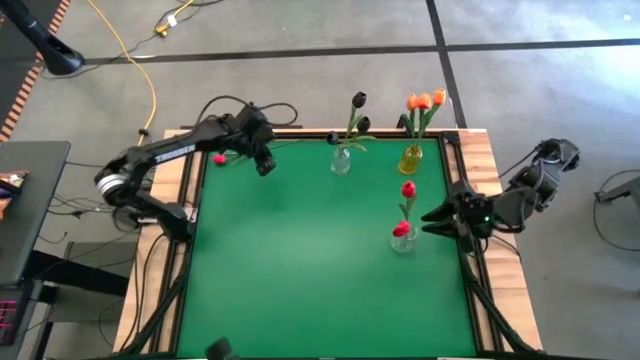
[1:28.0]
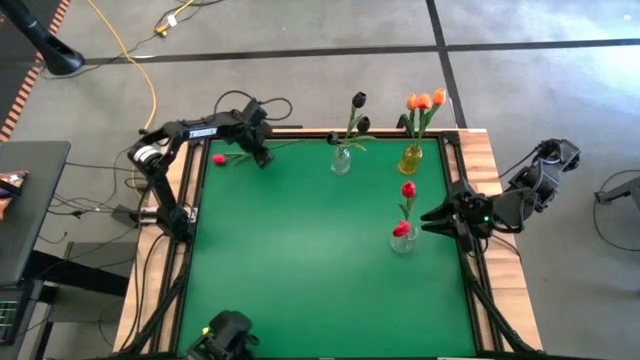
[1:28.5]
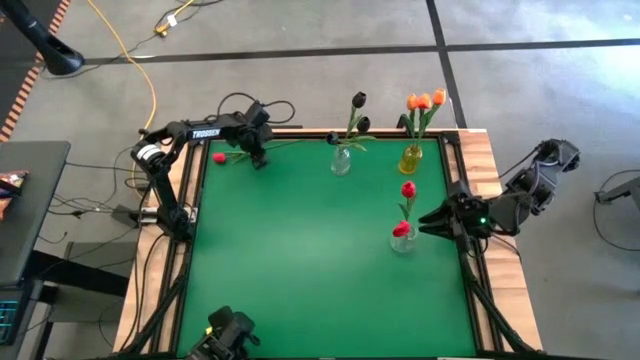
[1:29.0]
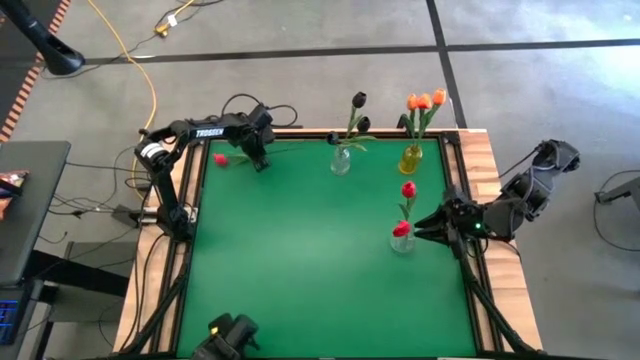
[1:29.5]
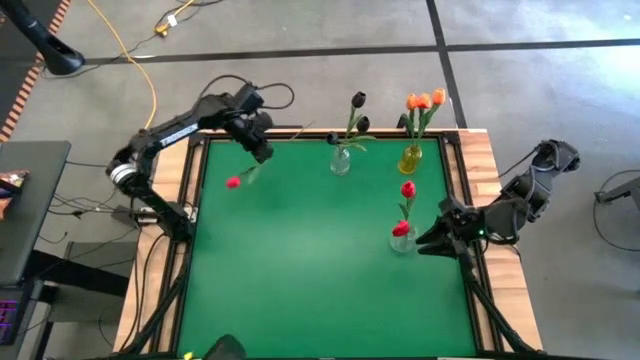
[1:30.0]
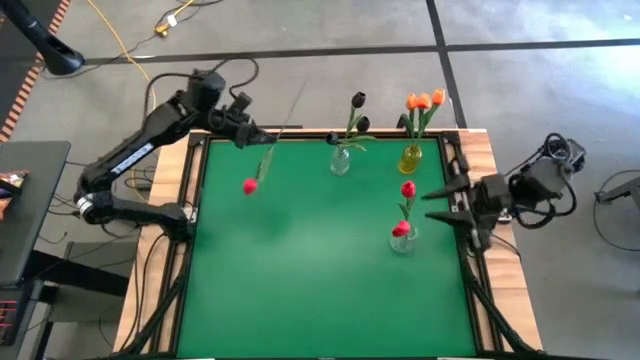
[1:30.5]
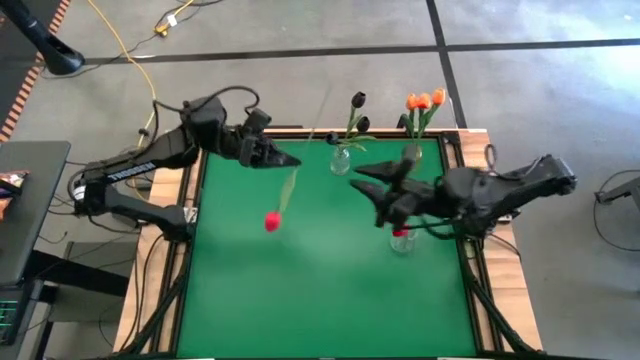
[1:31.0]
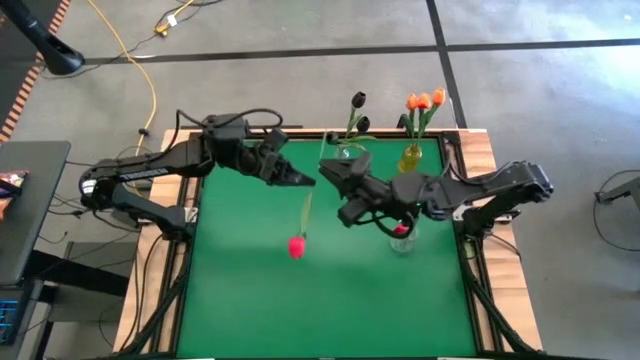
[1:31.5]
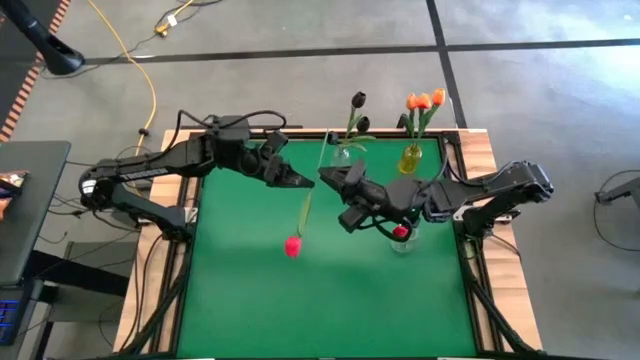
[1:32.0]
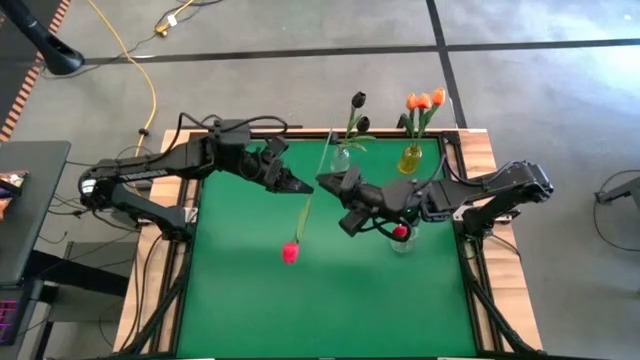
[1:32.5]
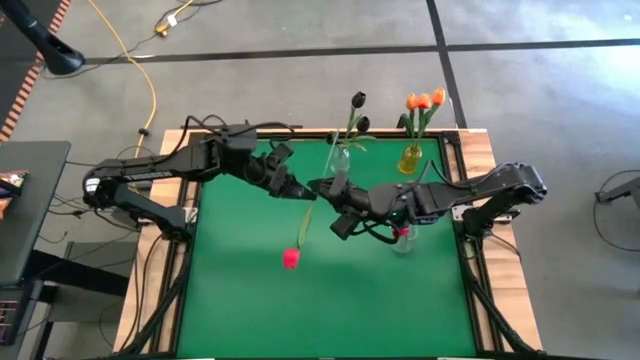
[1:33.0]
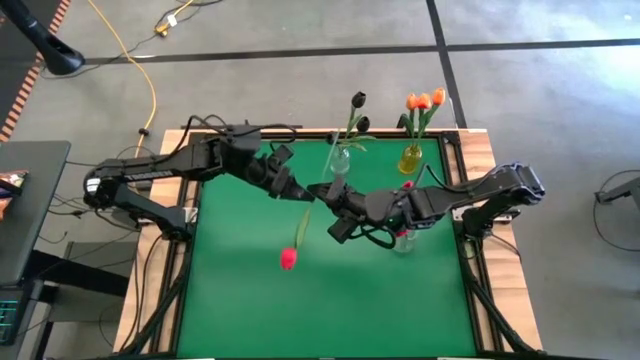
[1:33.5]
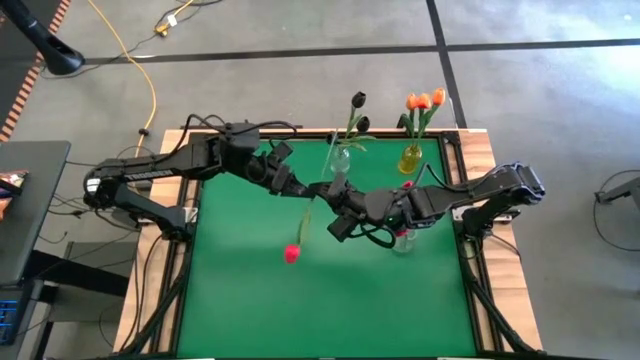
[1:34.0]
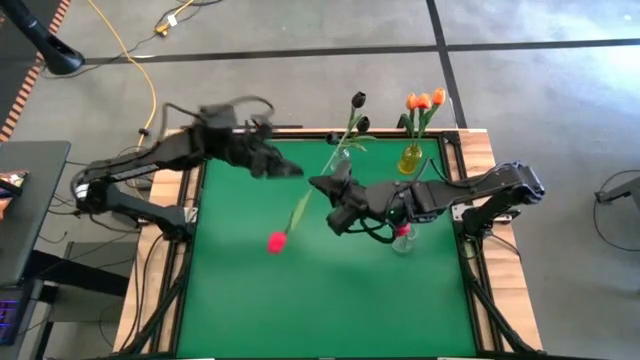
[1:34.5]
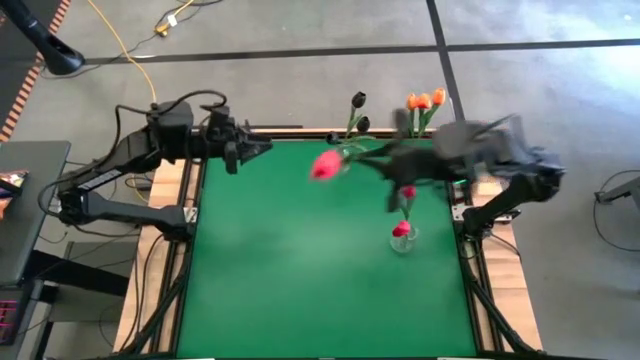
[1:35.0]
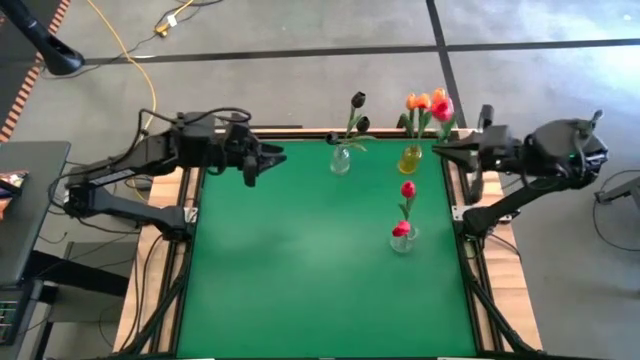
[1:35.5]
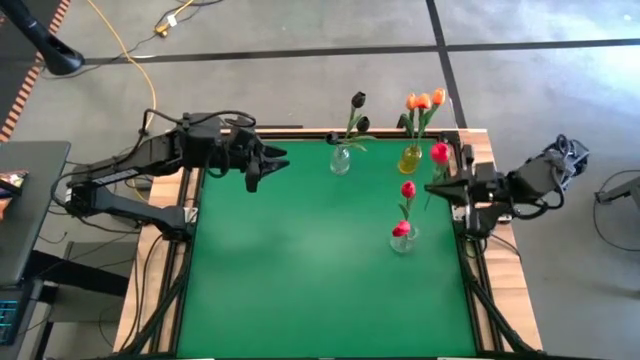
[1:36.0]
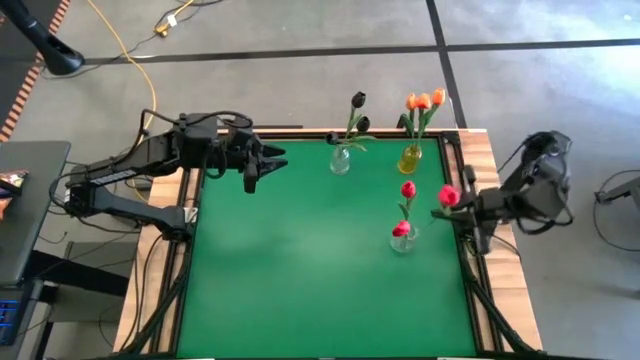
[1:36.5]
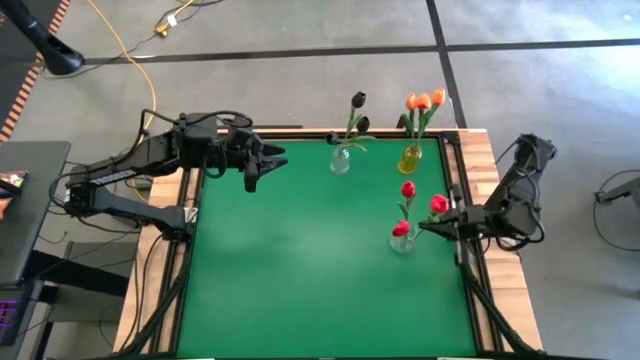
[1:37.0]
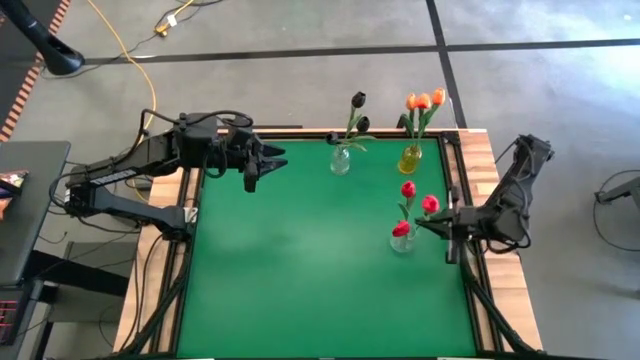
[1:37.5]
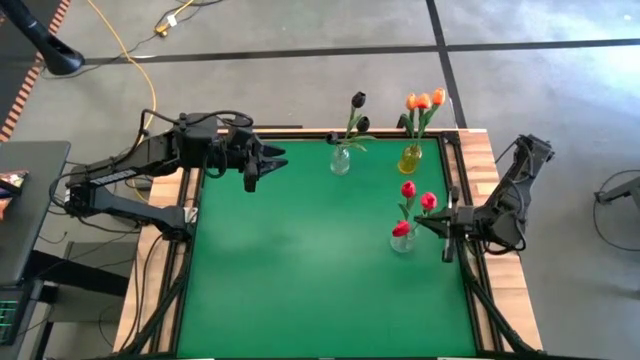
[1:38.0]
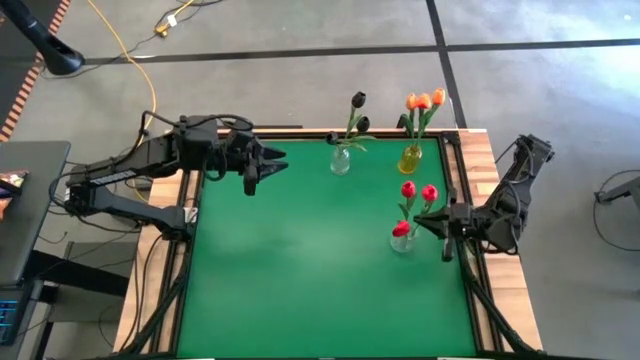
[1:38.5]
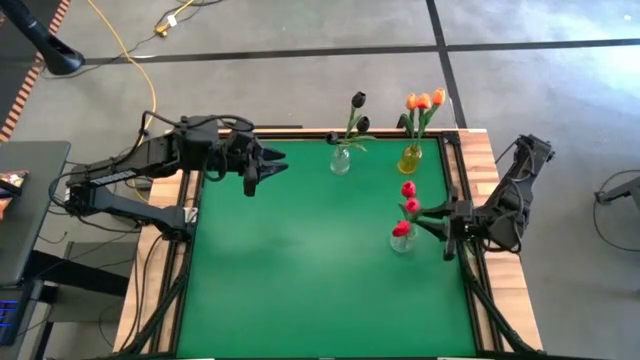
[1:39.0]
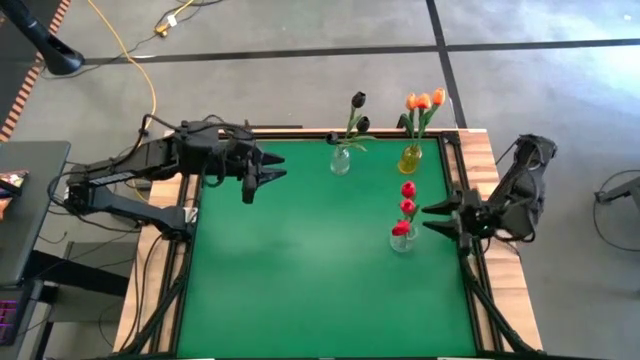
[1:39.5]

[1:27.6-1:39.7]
Task: Sort flowers into vase by color
Put the red flower into the right transparent vase

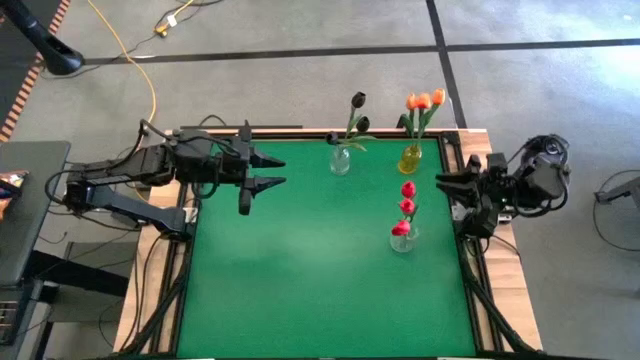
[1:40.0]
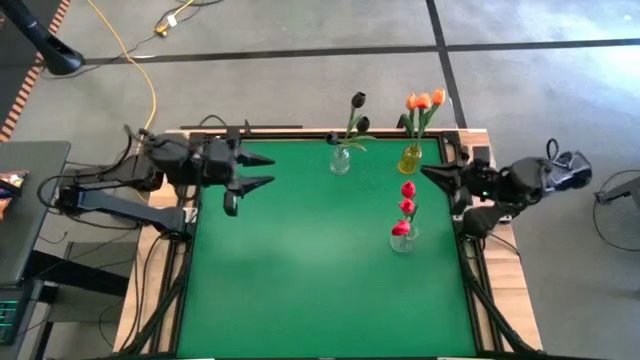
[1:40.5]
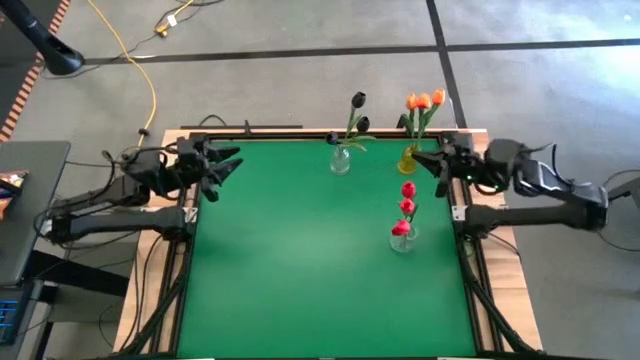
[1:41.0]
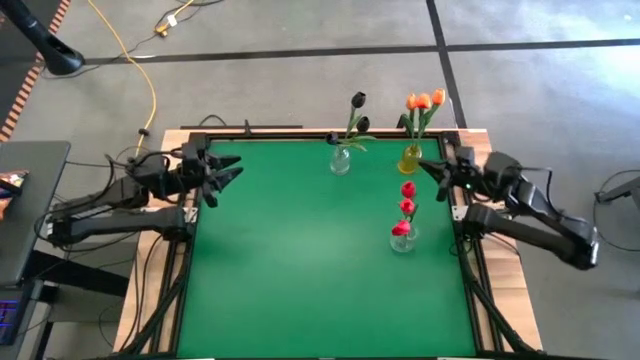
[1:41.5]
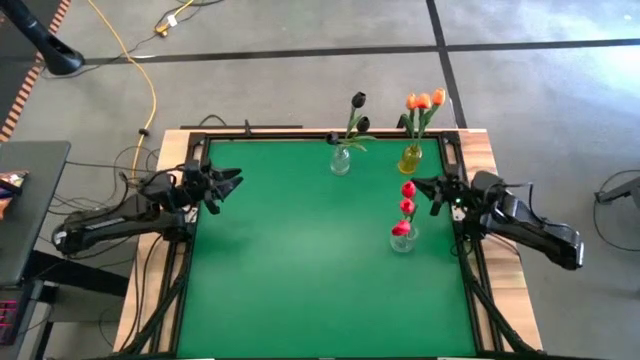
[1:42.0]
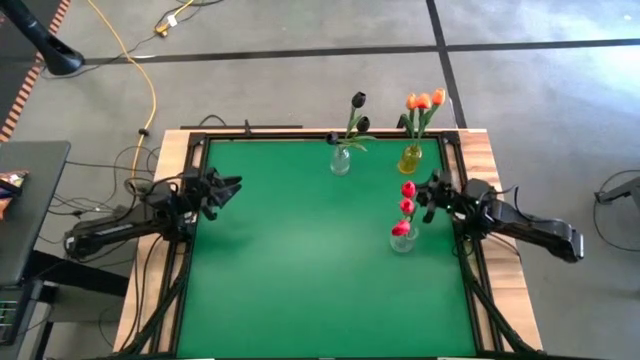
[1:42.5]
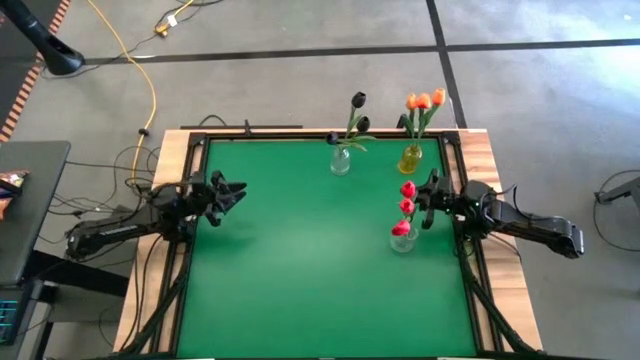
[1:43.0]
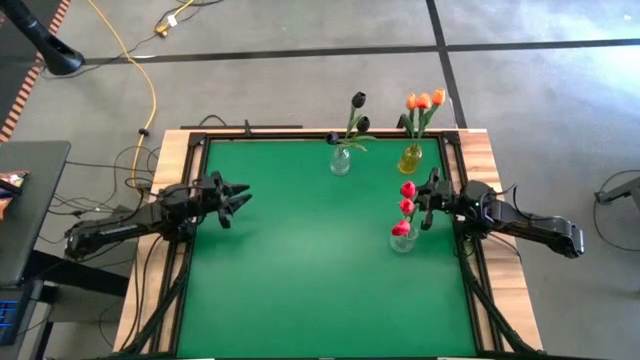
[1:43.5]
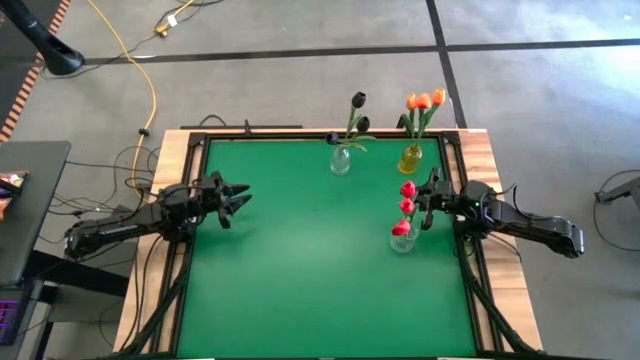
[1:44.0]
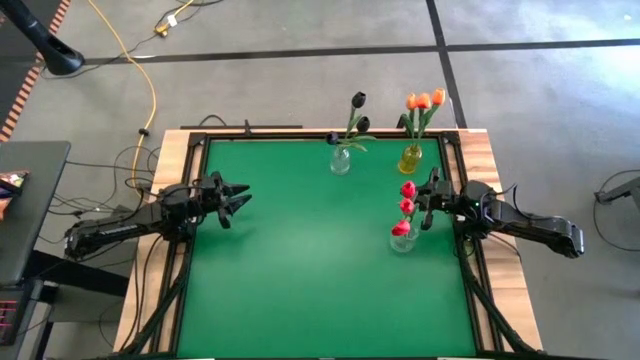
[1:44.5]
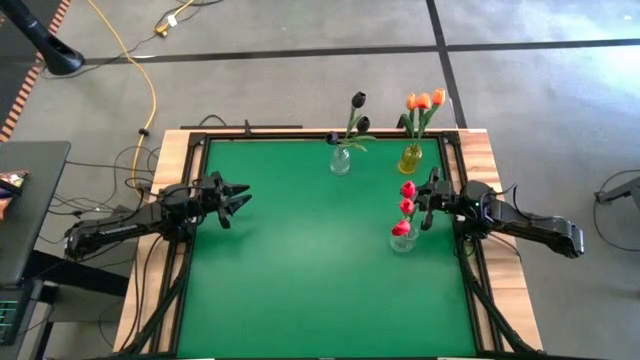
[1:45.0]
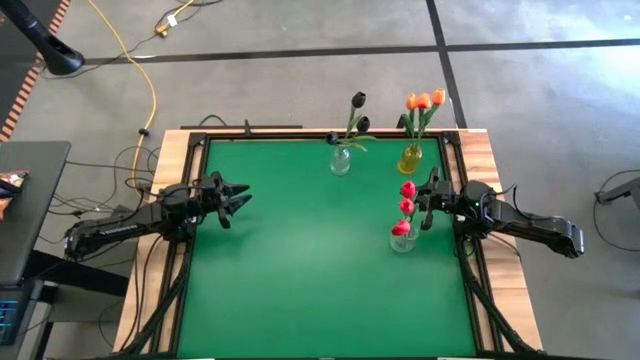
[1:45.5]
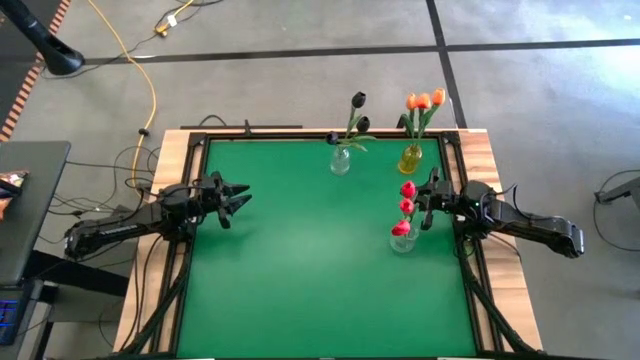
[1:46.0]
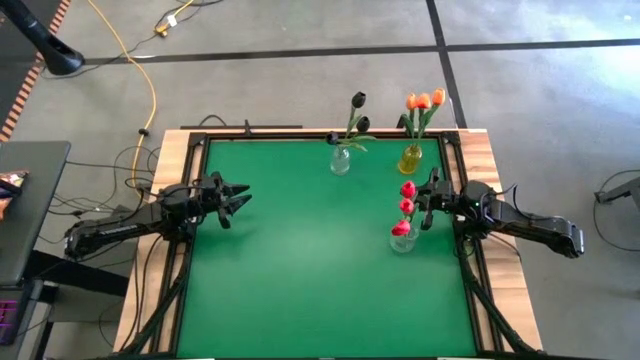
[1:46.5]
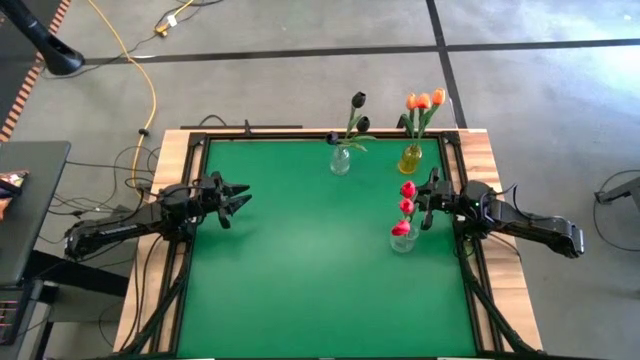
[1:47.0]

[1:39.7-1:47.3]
Return to Home position

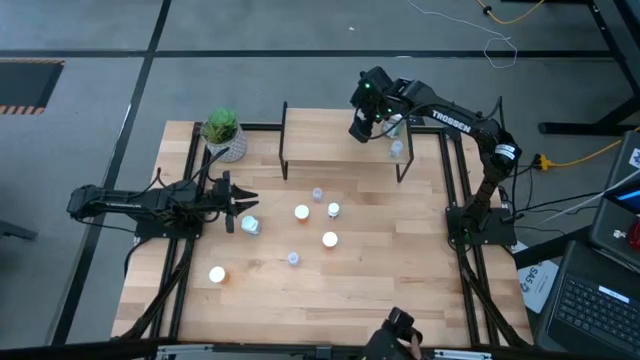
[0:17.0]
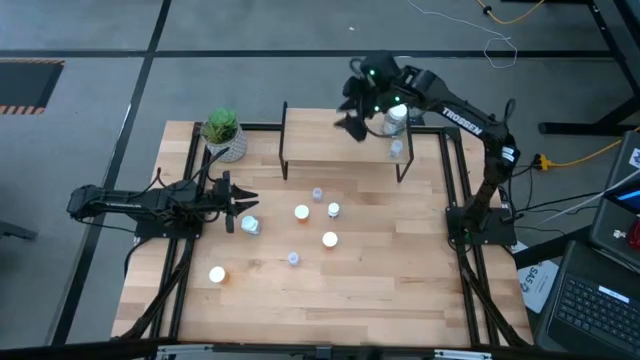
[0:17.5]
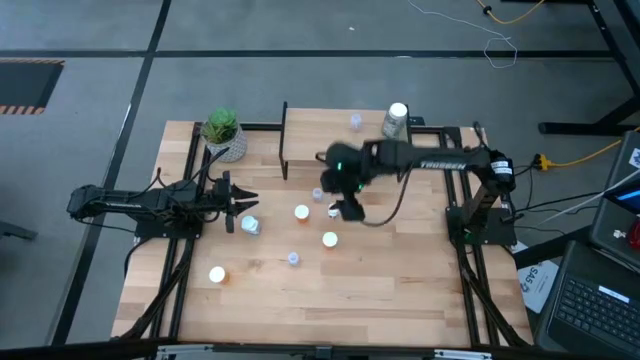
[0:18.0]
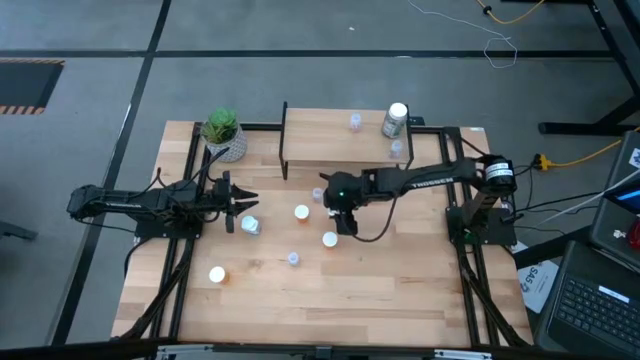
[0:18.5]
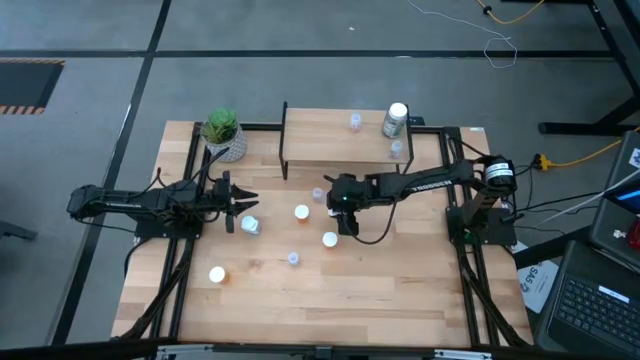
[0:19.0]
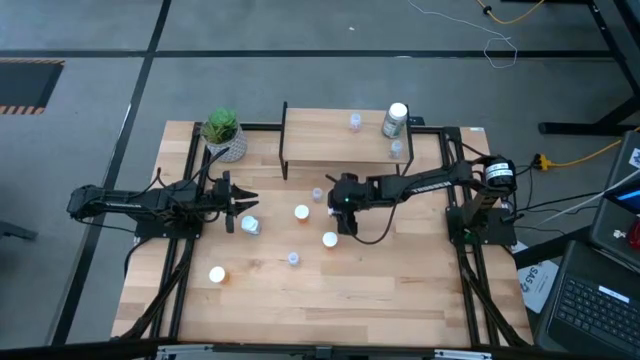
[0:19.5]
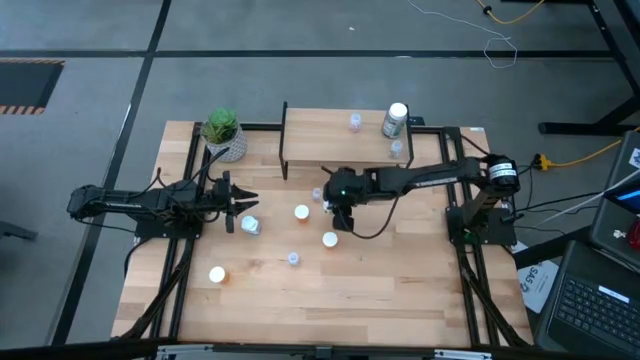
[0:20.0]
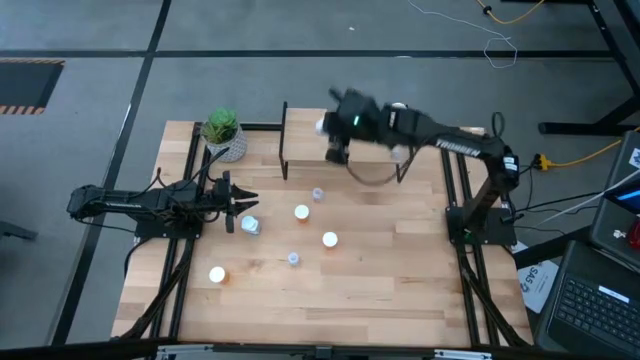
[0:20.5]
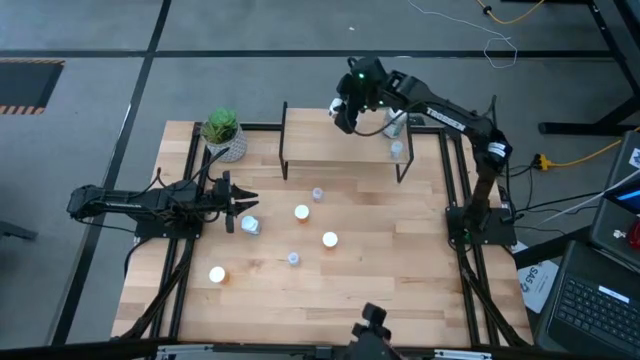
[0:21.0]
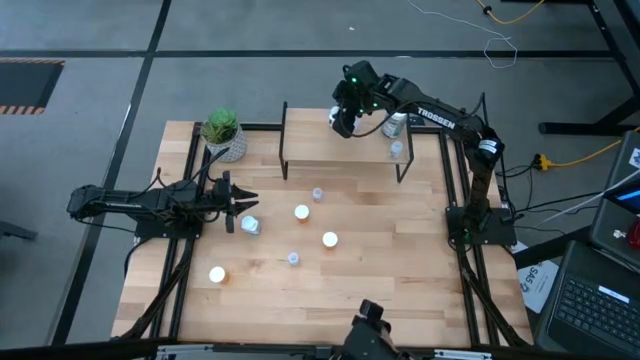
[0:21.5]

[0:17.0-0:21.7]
Task: Pick and place medicine bottles onto shelf by color
Put the white pill bottle on the shelf
